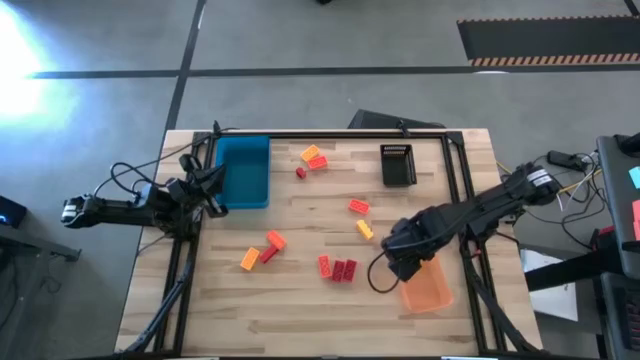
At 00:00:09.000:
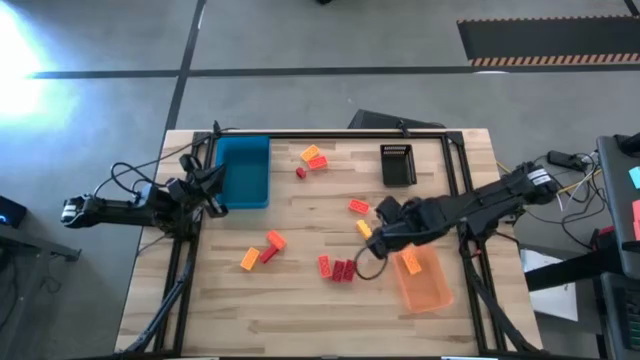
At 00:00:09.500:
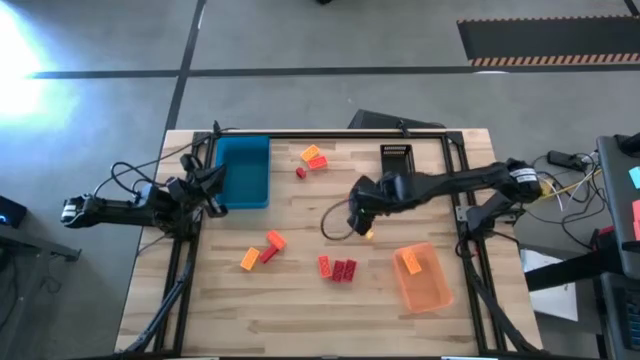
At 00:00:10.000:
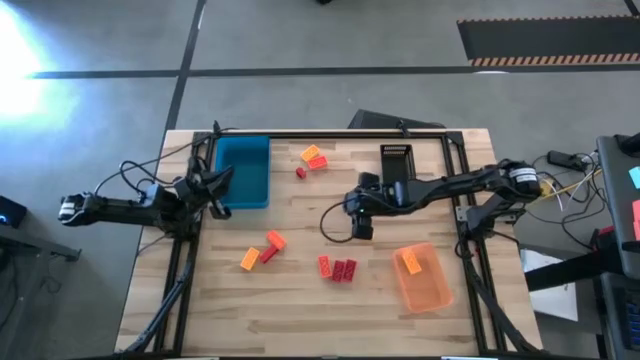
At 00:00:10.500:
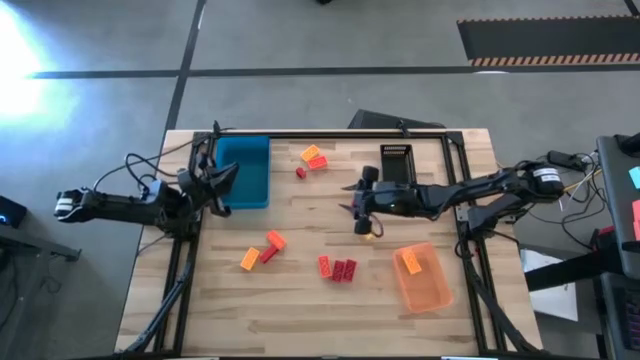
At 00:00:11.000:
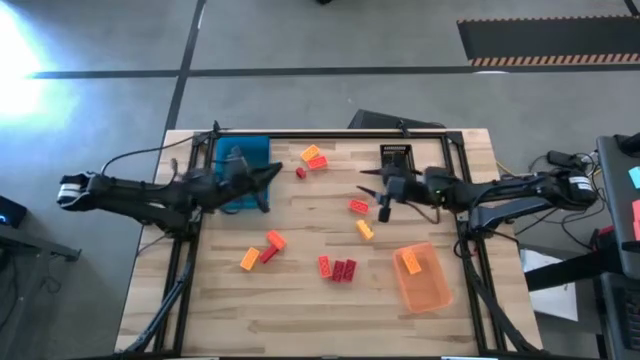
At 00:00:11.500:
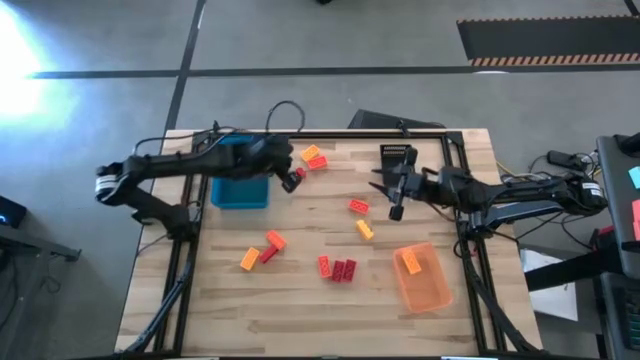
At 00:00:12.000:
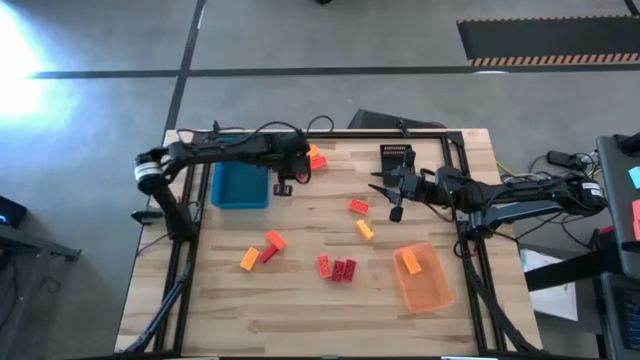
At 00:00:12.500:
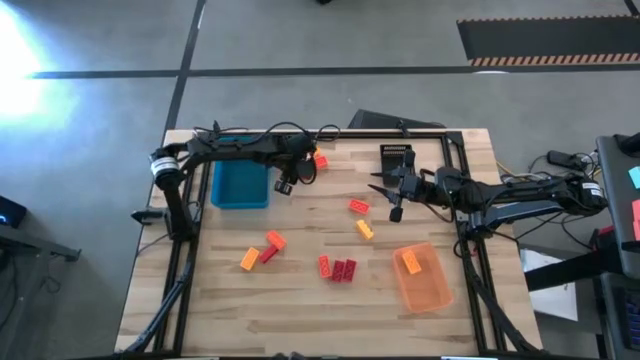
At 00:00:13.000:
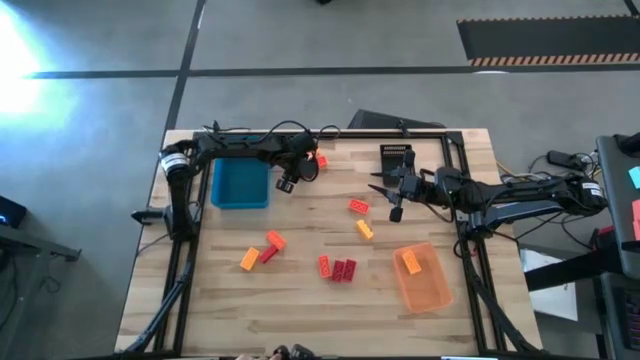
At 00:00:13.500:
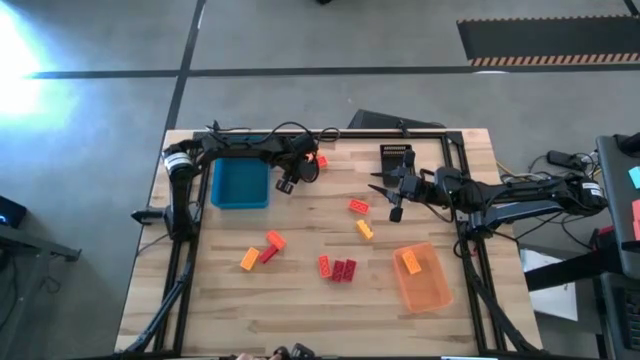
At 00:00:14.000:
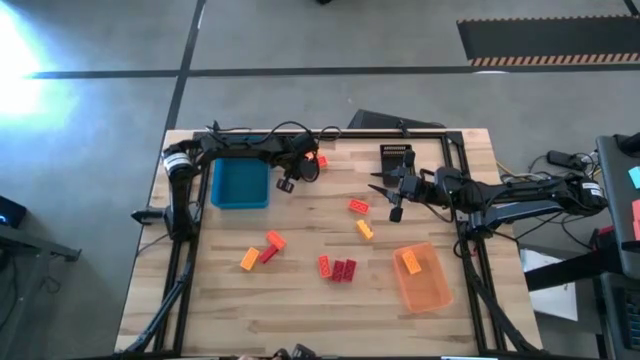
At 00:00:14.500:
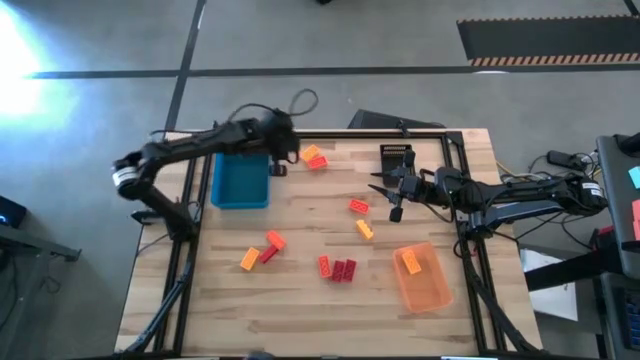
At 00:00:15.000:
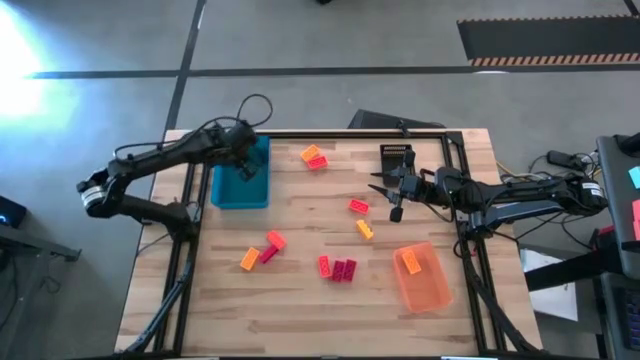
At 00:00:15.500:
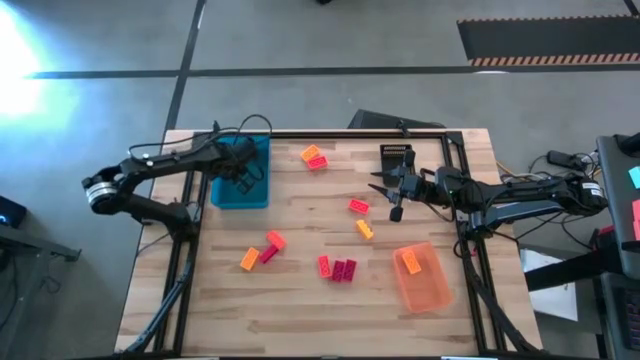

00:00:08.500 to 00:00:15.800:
Task: Sort & place blocks by color
Put the red game piece into the blue bin

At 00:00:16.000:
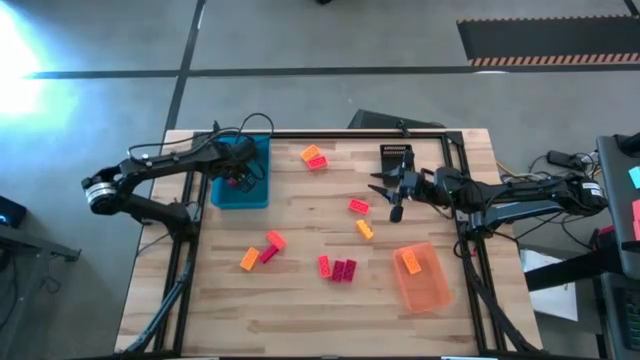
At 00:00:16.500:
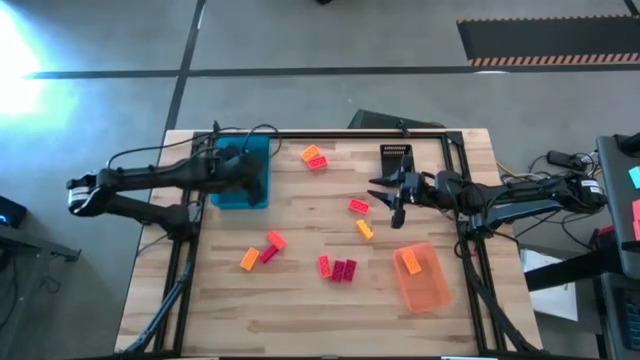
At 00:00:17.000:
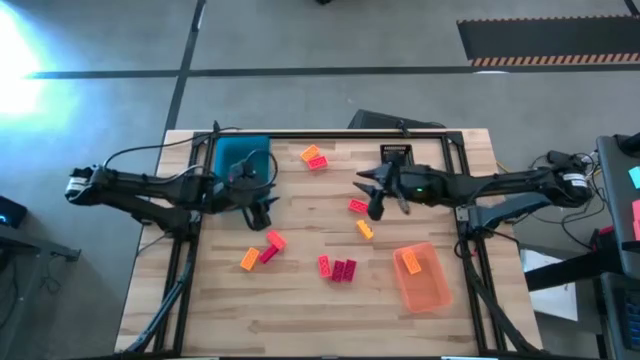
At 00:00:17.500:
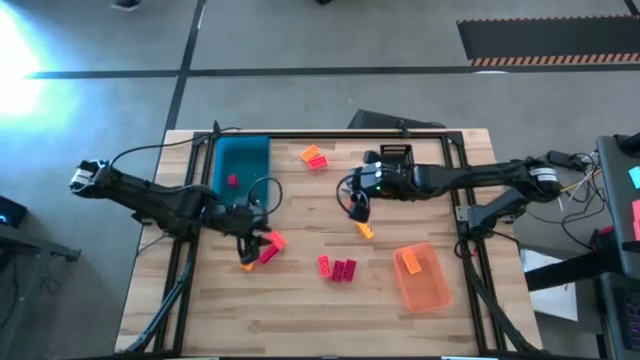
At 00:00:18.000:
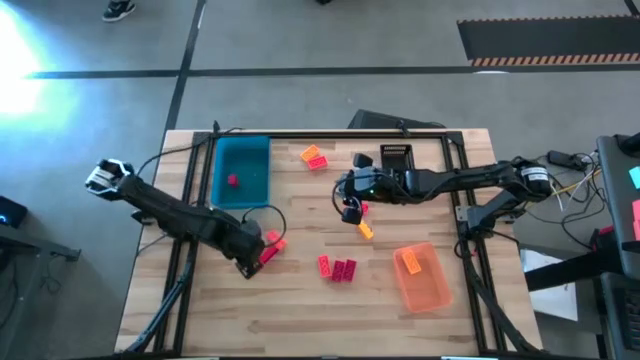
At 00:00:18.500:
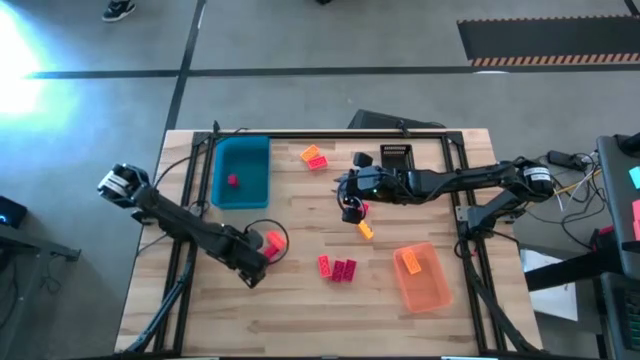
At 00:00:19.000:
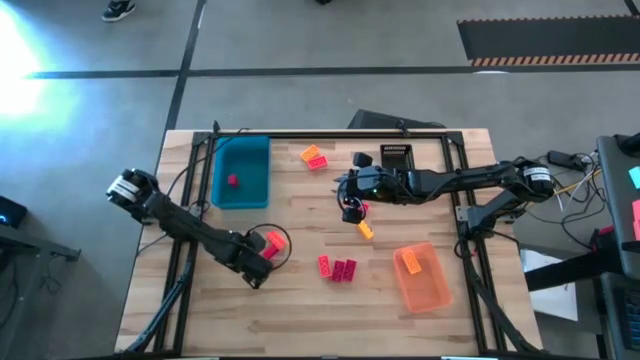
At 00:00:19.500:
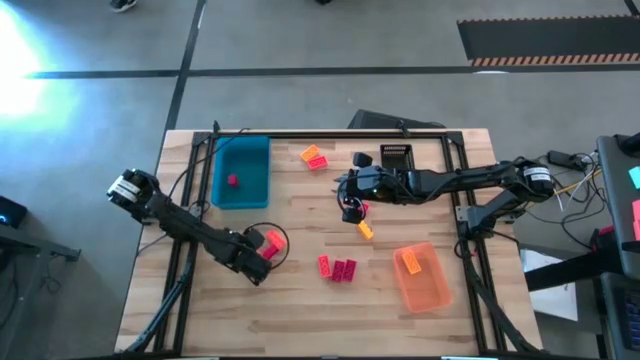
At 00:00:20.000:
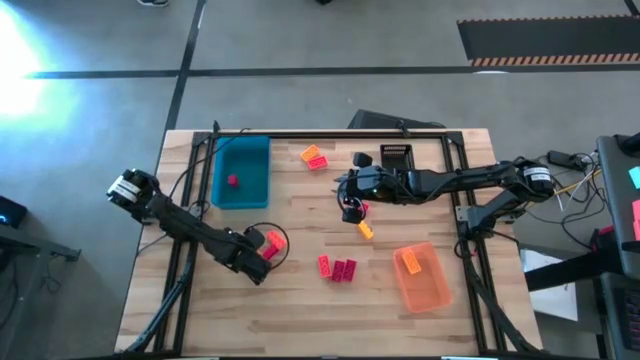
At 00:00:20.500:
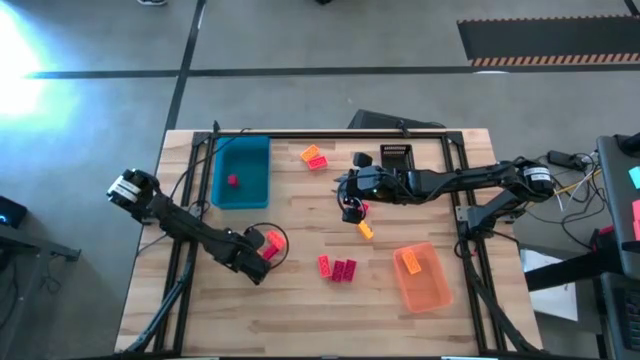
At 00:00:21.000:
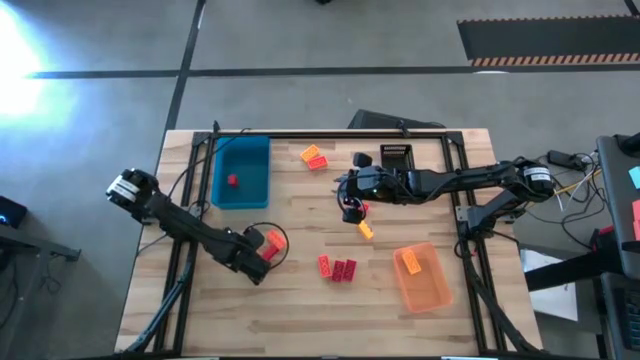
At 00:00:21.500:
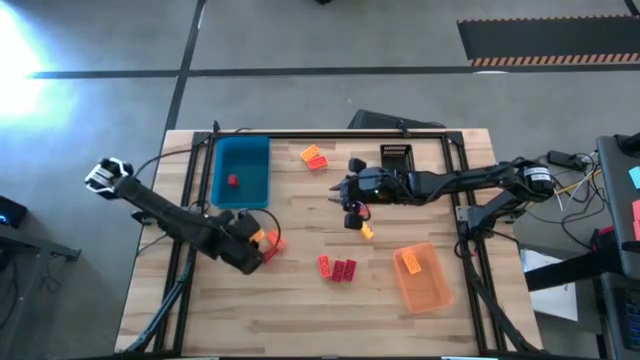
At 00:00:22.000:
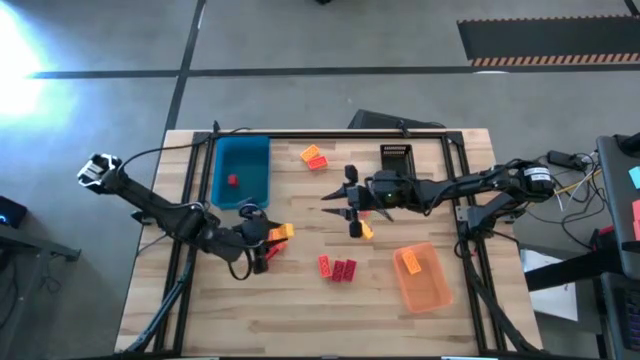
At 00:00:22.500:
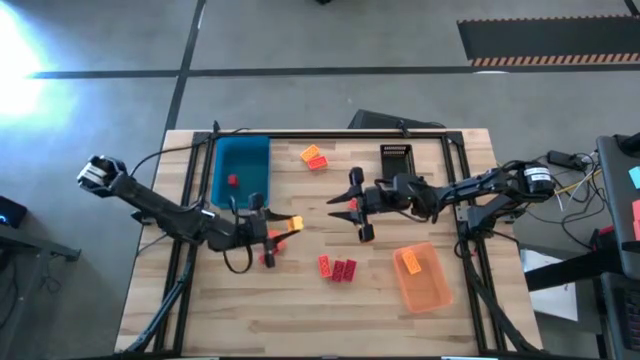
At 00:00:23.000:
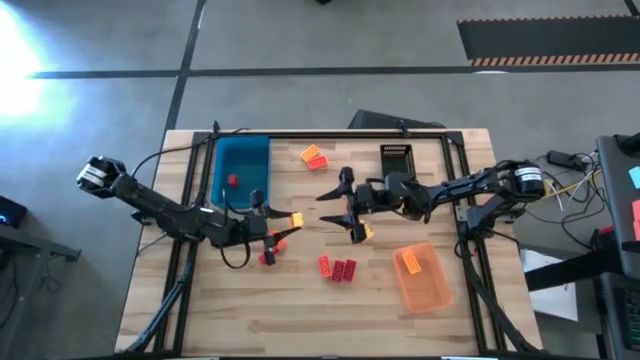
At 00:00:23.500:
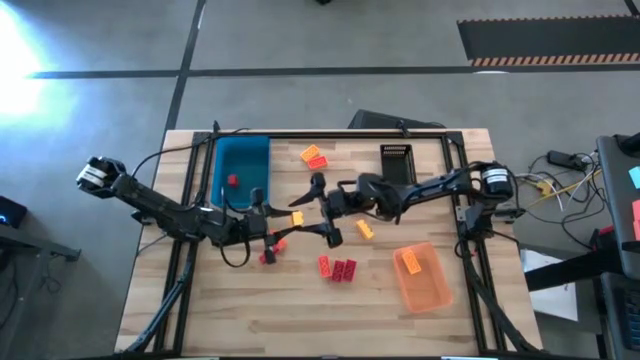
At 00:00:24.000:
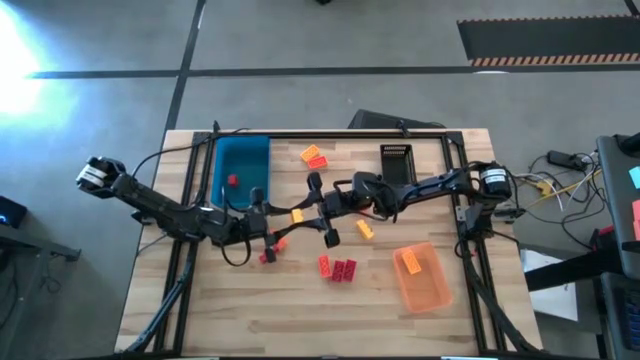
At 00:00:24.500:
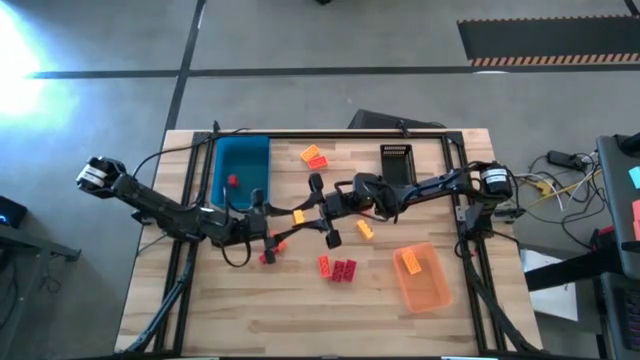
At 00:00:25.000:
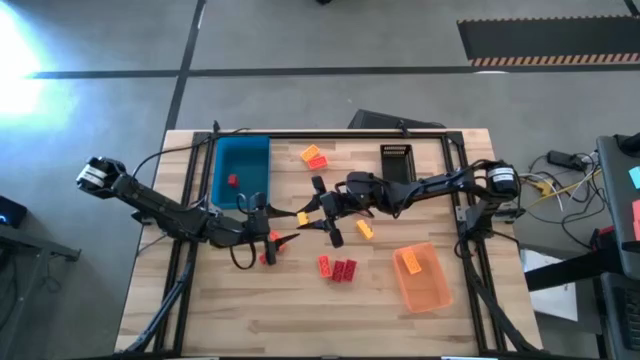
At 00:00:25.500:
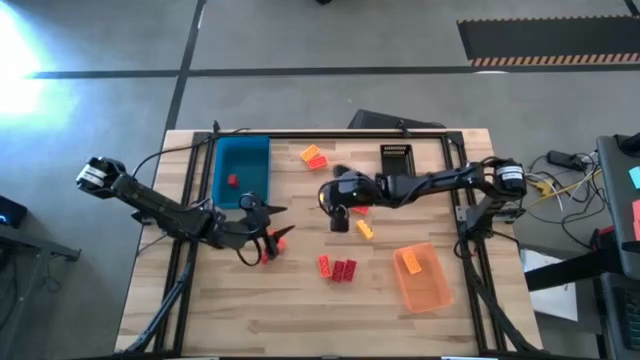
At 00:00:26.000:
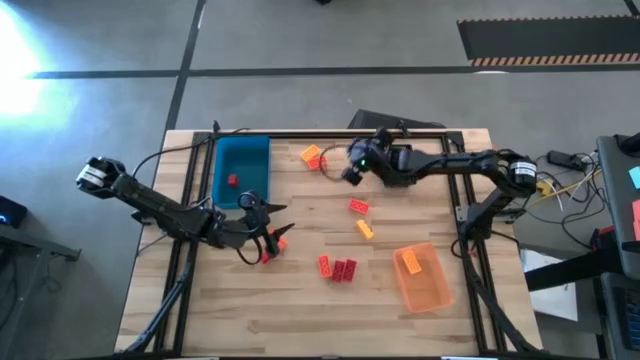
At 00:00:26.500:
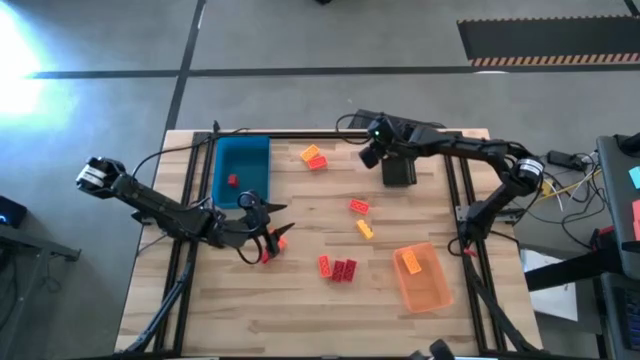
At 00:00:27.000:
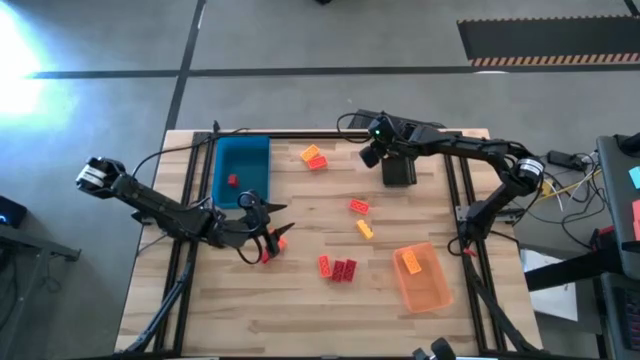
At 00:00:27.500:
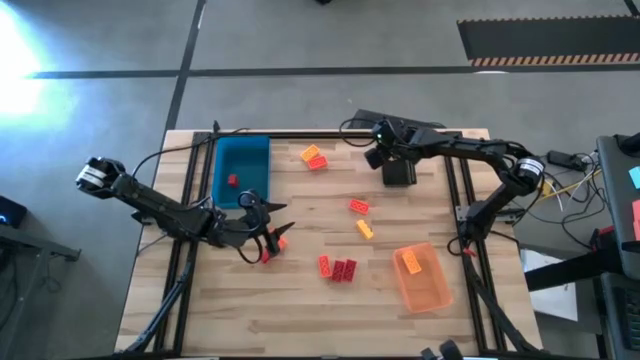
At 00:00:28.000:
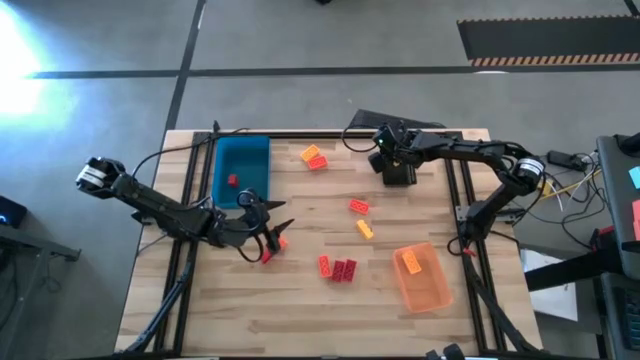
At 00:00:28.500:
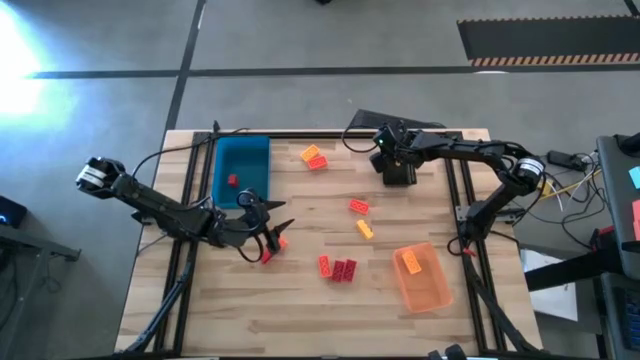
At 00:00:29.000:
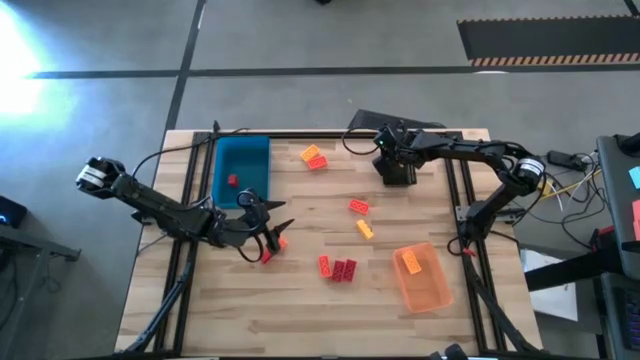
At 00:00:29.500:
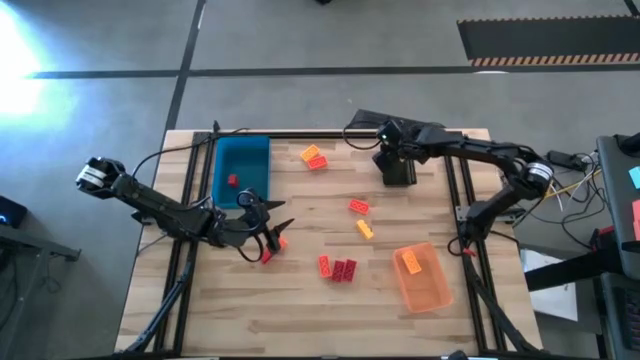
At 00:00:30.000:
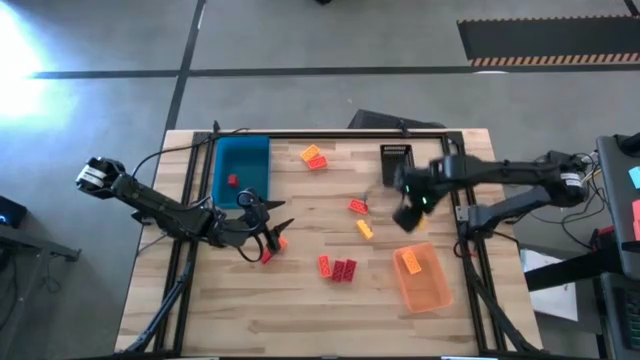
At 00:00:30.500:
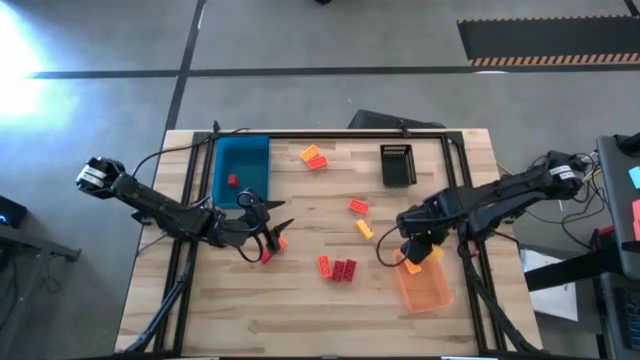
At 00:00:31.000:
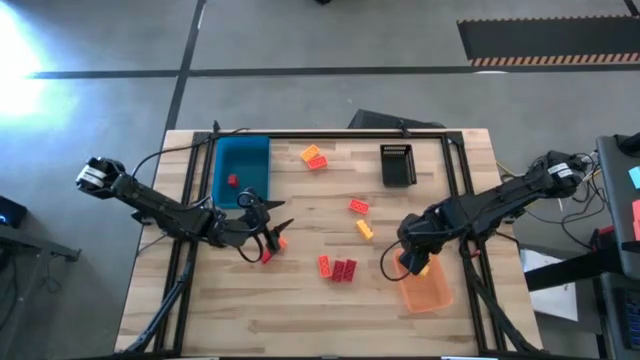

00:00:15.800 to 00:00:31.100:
Put the yellow game piece into the orange bin
